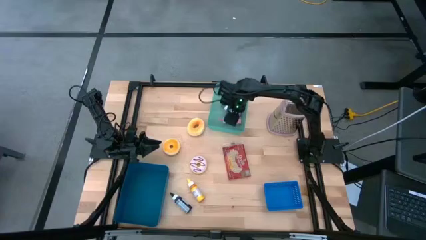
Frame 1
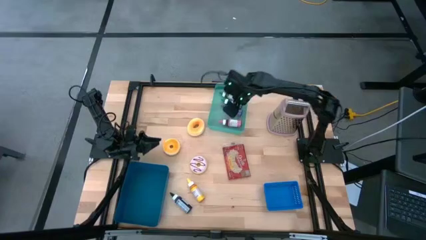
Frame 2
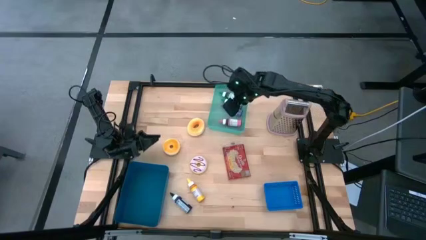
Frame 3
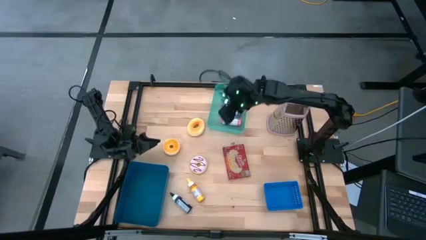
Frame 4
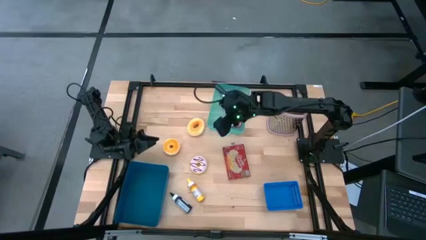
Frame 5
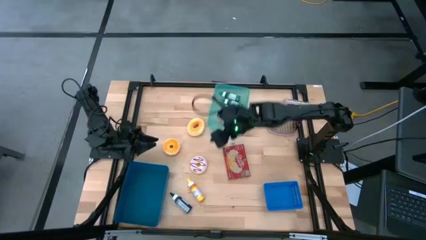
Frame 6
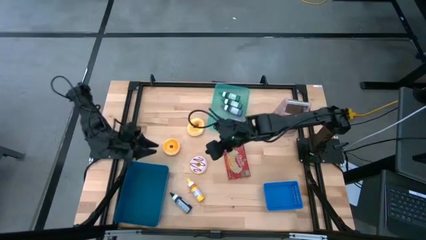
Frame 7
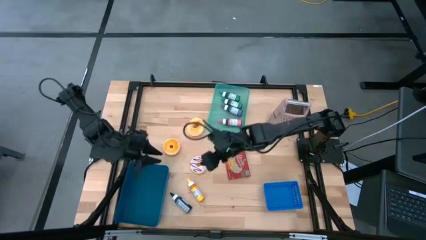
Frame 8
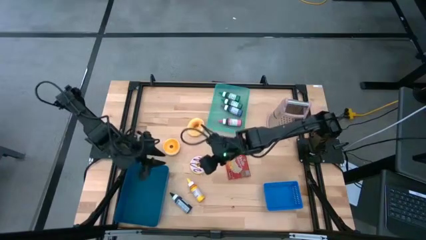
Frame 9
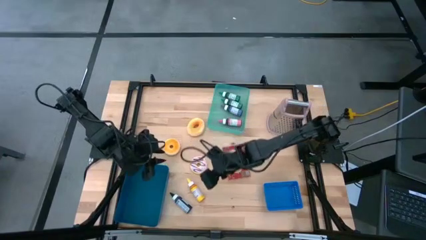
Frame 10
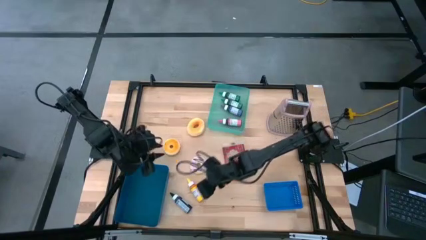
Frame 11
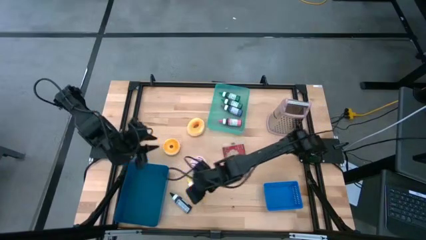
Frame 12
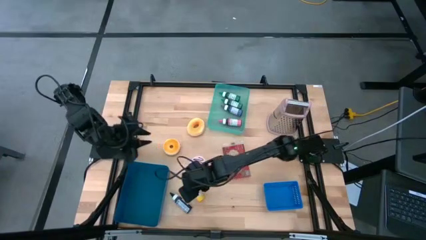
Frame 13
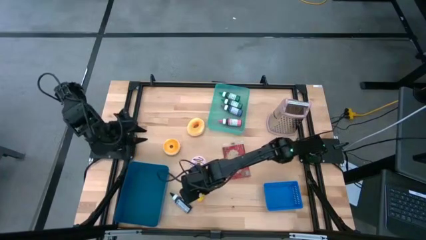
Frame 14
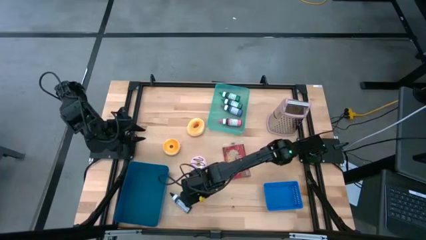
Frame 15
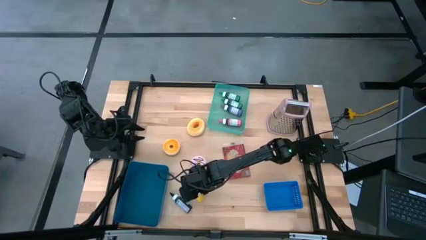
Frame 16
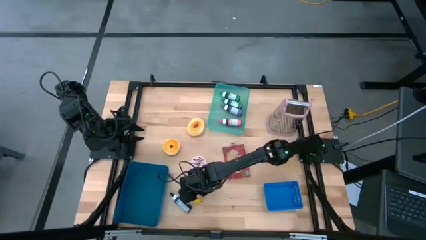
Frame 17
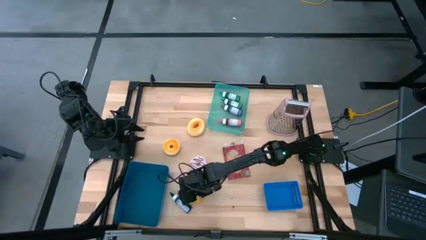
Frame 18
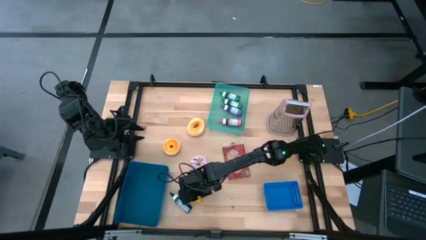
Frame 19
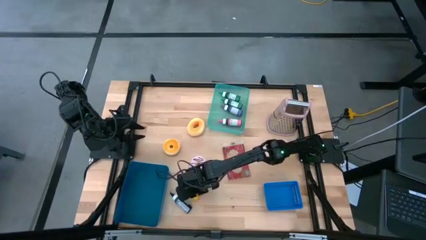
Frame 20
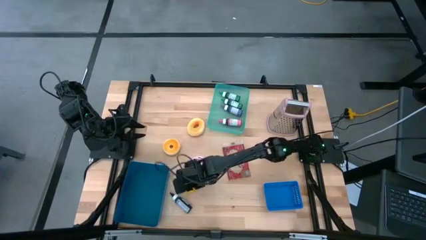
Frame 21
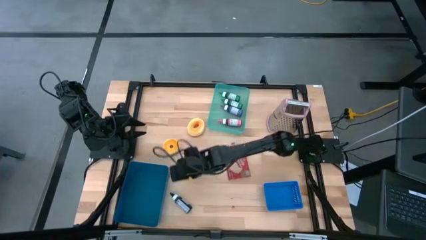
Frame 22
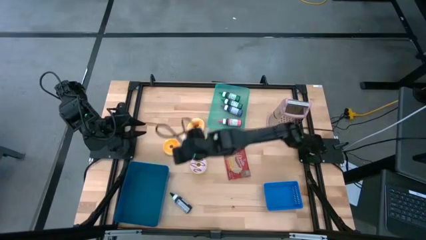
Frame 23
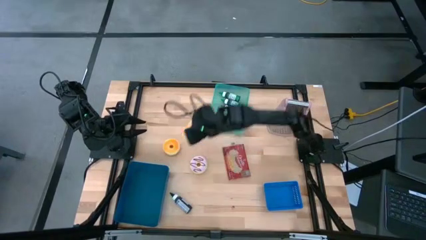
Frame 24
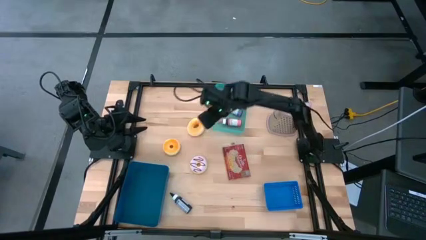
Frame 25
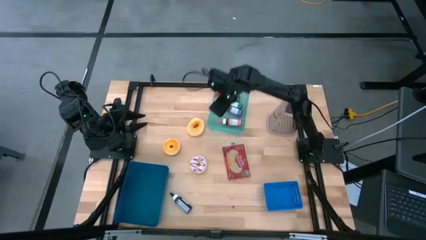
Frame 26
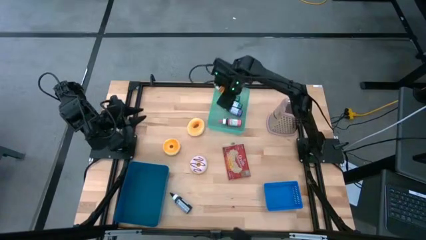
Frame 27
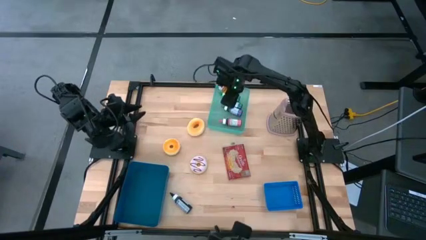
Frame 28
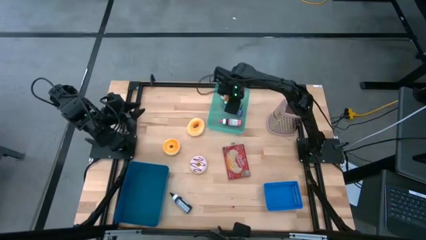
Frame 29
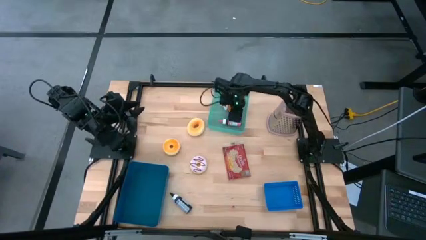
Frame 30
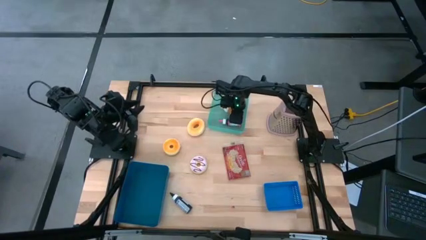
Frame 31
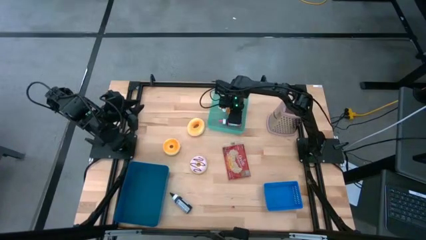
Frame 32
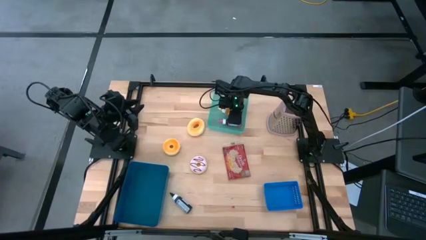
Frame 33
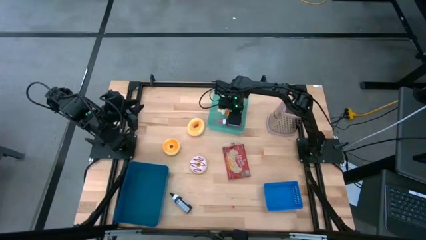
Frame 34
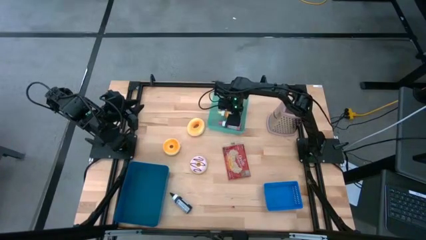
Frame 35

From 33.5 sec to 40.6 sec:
Put the yellow food coloring into the green bin

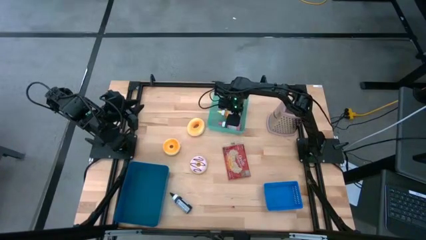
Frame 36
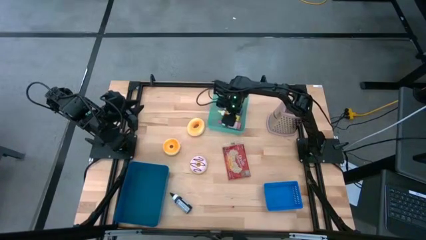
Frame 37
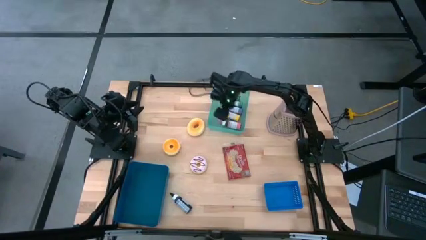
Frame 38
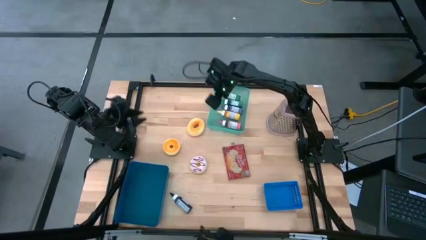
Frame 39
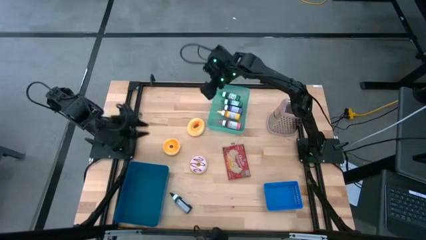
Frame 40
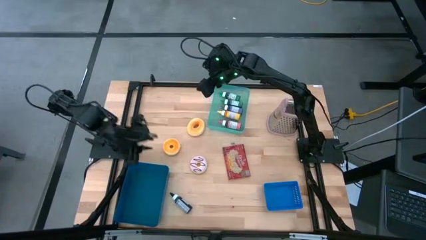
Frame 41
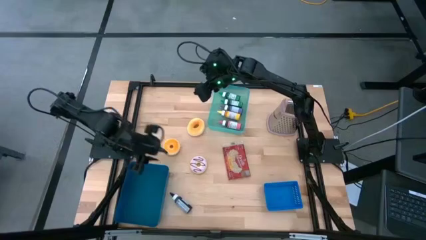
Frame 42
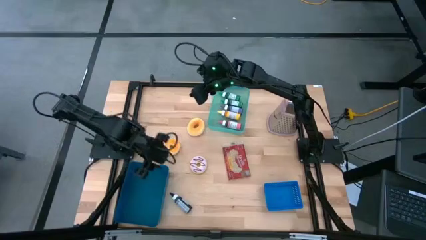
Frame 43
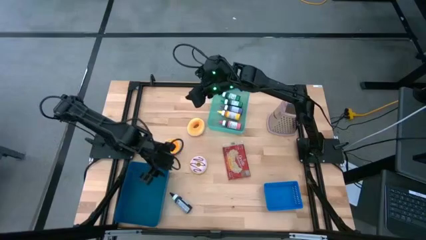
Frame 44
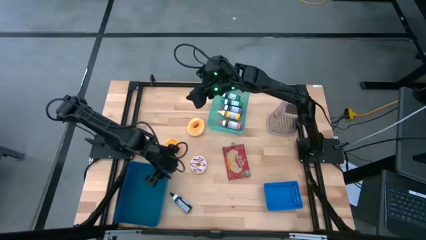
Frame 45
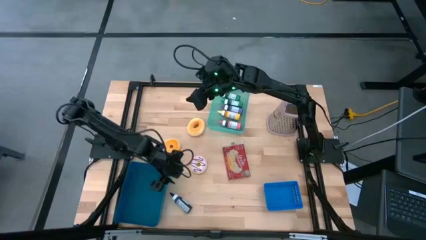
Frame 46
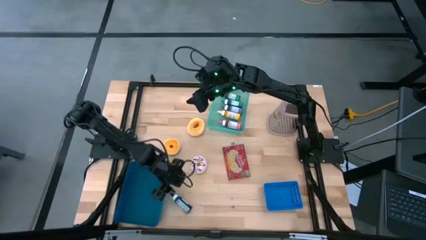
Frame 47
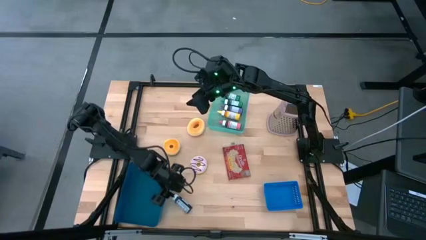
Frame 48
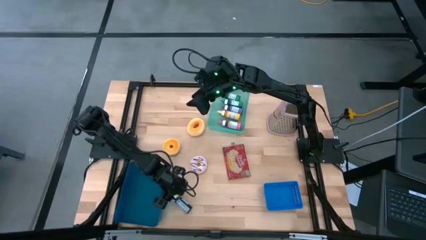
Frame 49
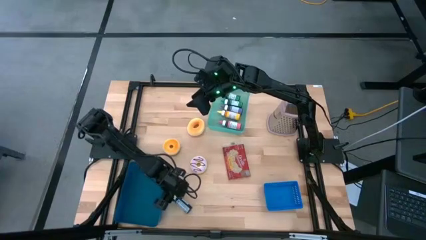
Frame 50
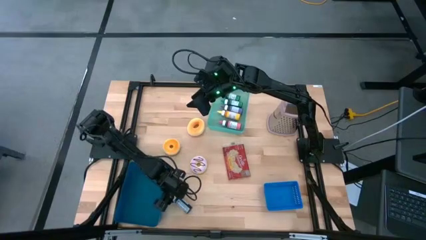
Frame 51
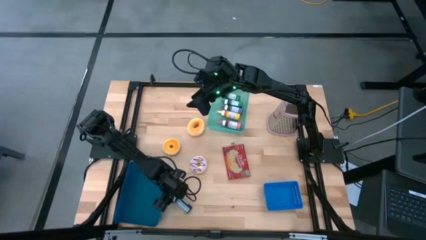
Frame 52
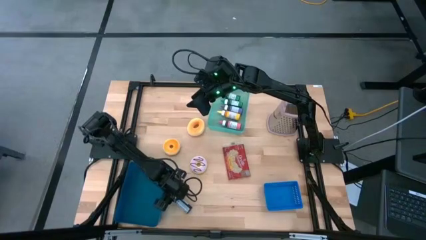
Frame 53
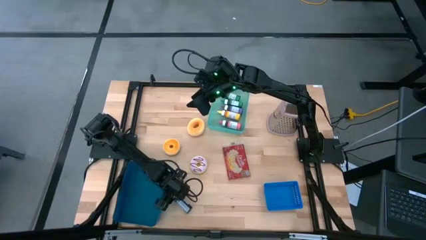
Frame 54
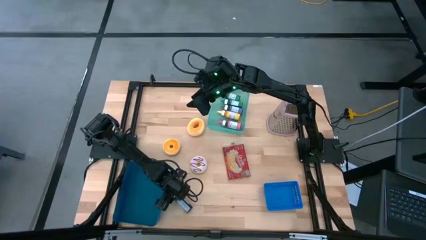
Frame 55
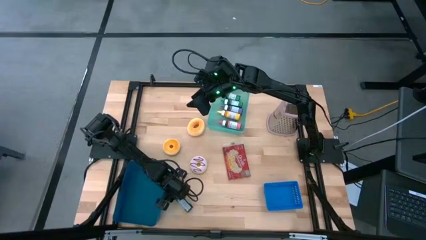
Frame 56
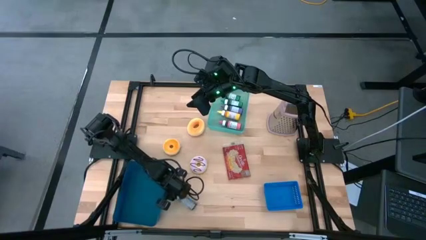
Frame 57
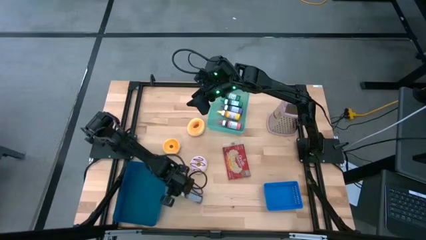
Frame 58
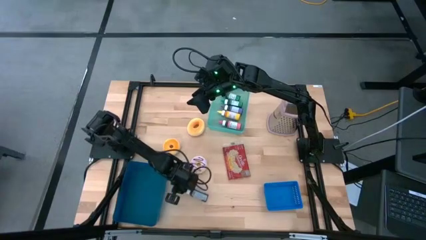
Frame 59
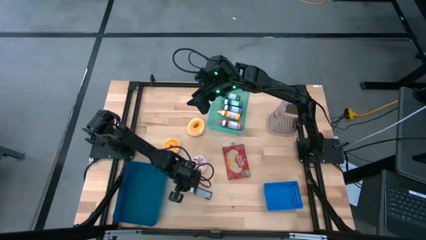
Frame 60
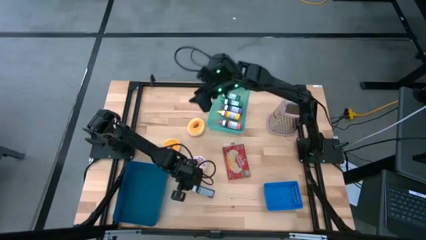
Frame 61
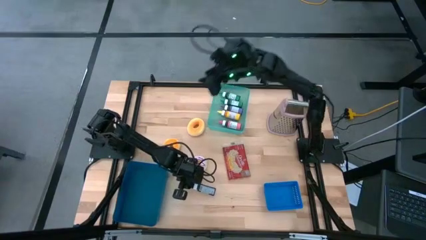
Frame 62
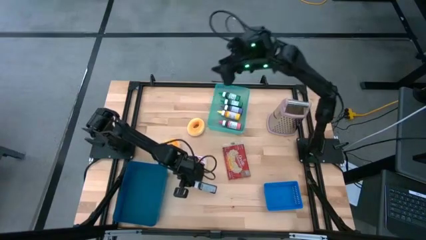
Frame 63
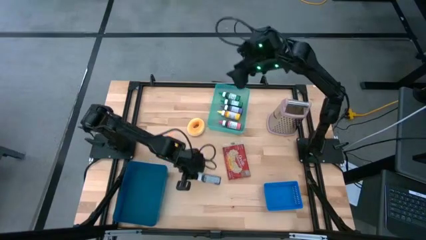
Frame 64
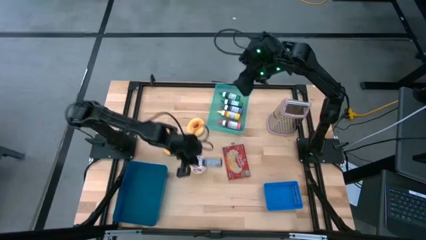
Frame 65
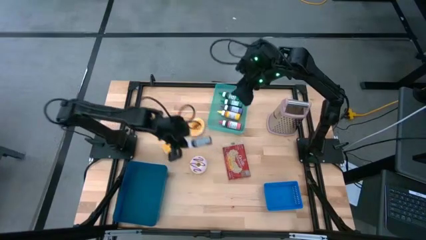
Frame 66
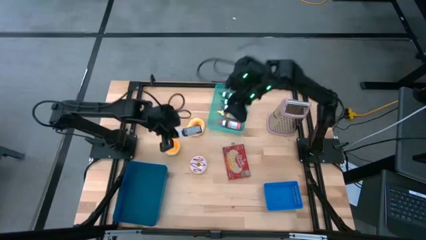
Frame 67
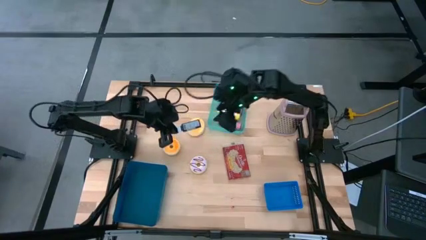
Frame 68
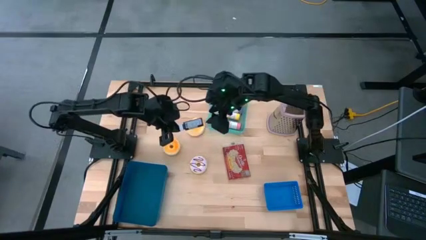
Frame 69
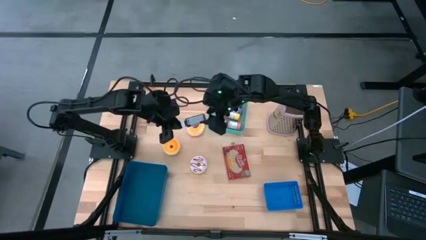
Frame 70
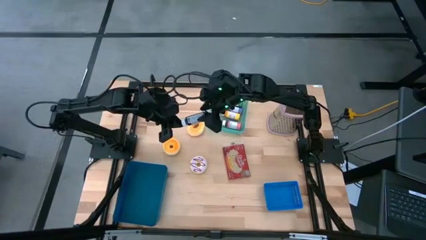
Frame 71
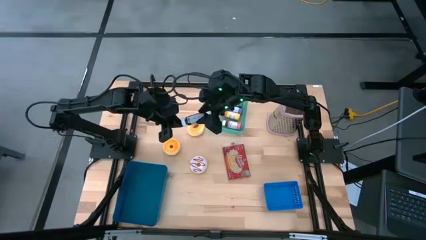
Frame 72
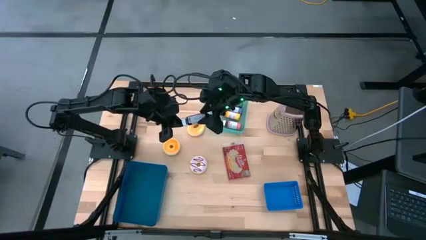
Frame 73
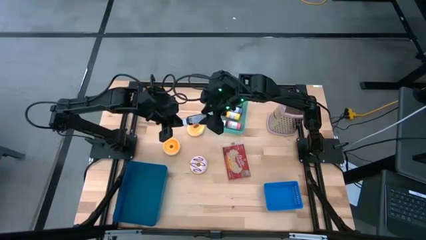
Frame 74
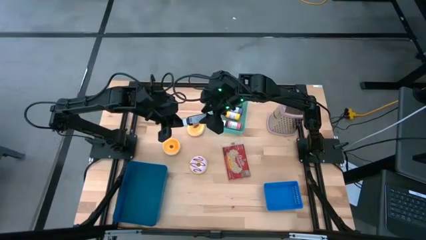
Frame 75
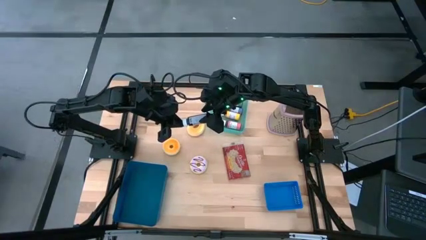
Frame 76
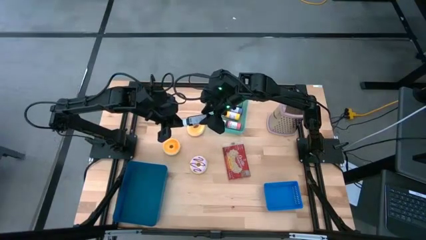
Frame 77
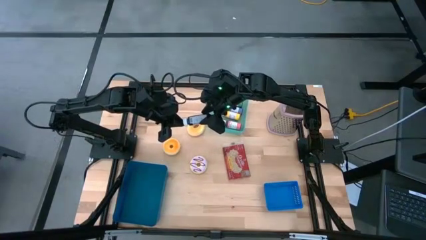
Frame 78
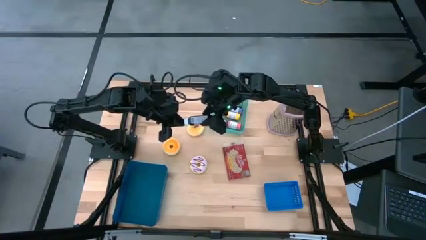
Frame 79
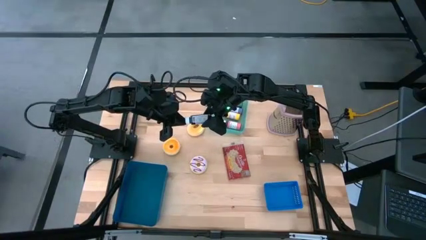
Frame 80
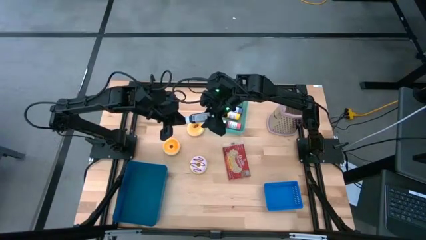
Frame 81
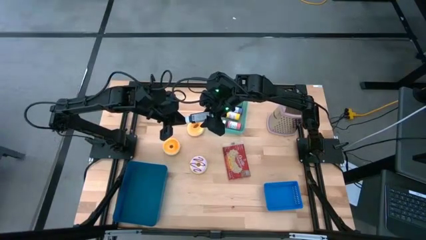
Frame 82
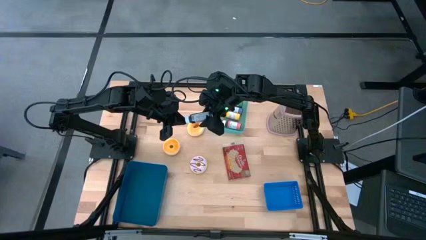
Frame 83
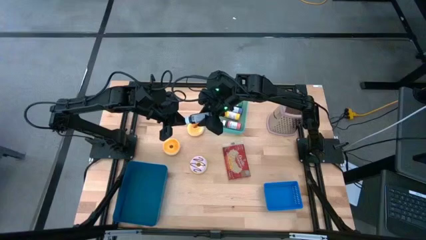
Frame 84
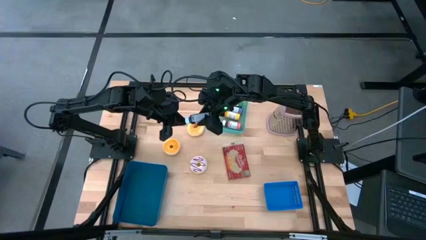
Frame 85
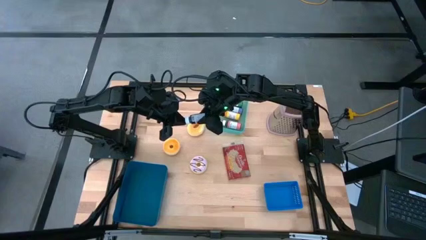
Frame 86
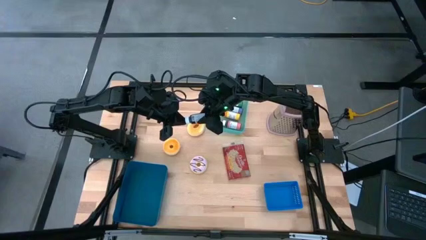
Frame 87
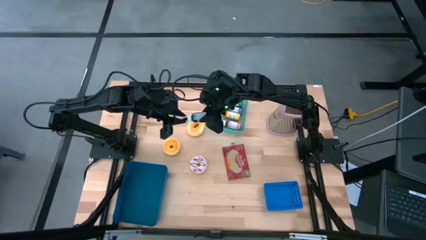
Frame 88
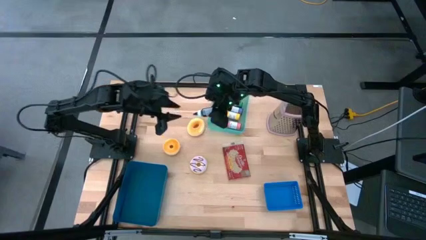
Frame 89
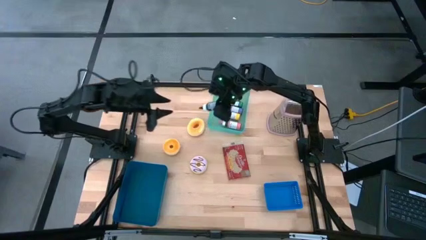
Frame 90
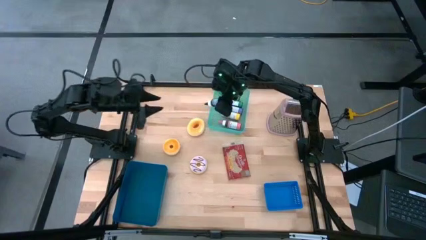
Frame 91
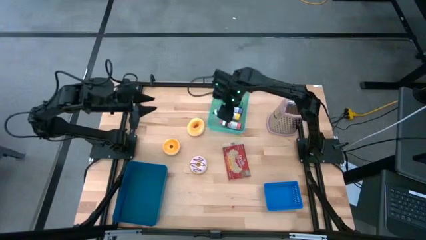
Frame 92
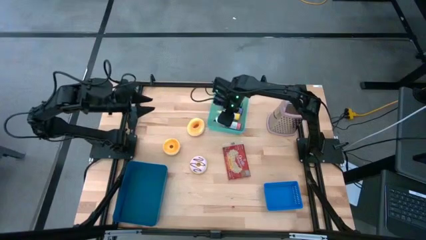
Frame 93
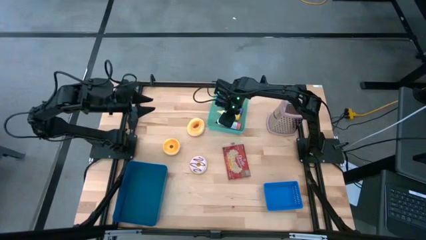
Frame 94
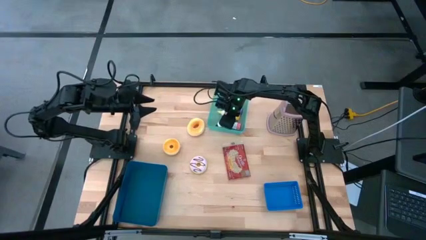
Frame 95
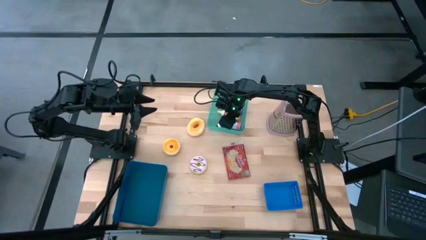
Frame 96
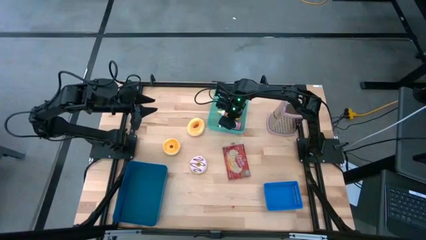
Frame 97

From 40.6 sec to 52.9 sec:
Put the black food coloring into the green bin
